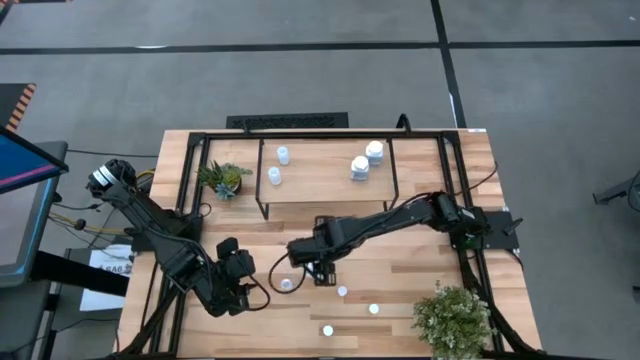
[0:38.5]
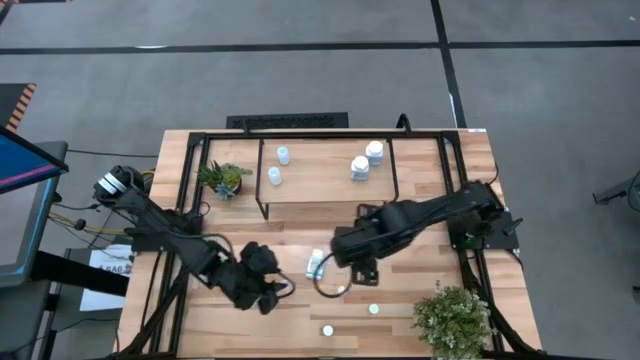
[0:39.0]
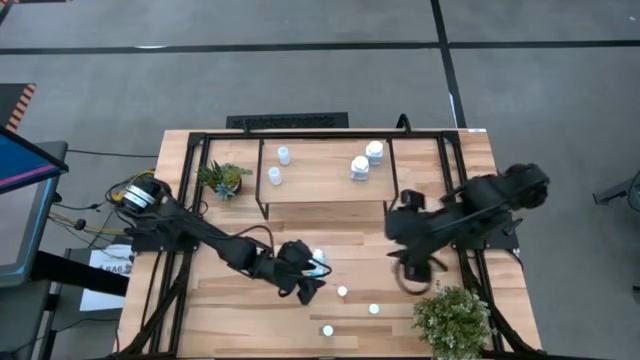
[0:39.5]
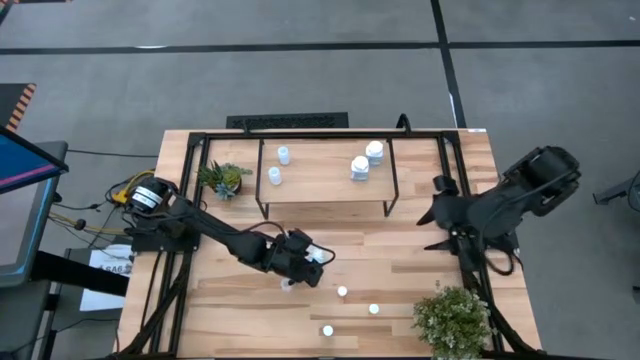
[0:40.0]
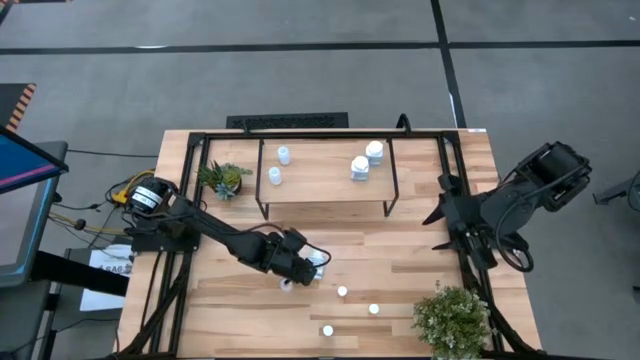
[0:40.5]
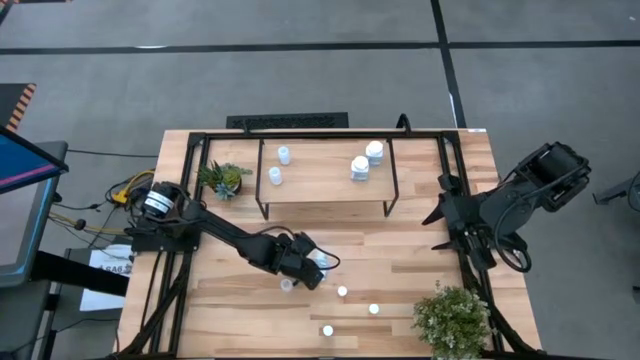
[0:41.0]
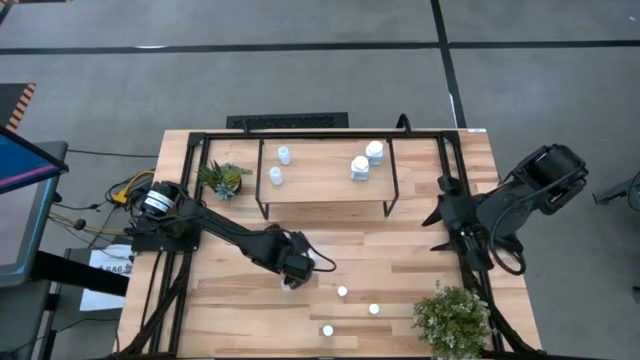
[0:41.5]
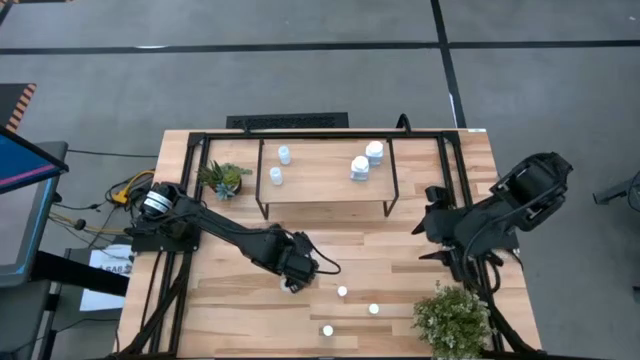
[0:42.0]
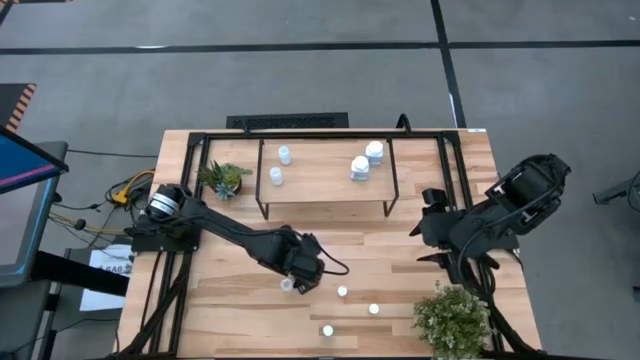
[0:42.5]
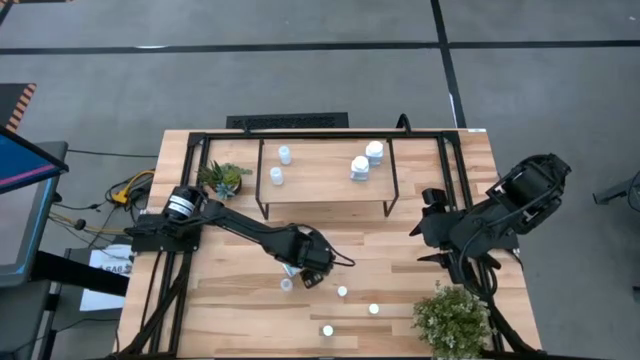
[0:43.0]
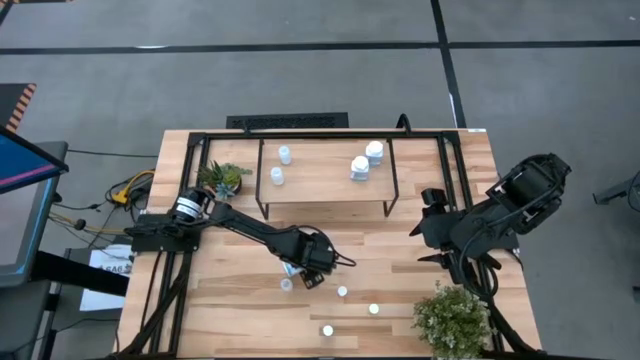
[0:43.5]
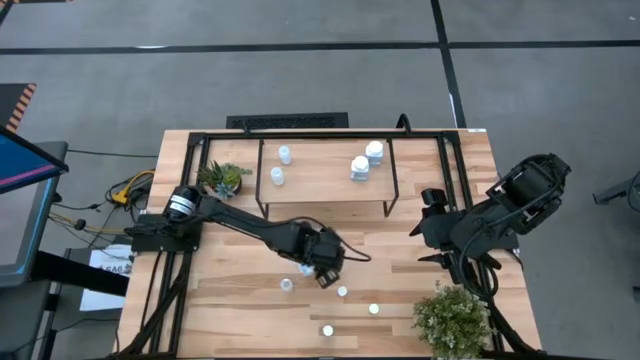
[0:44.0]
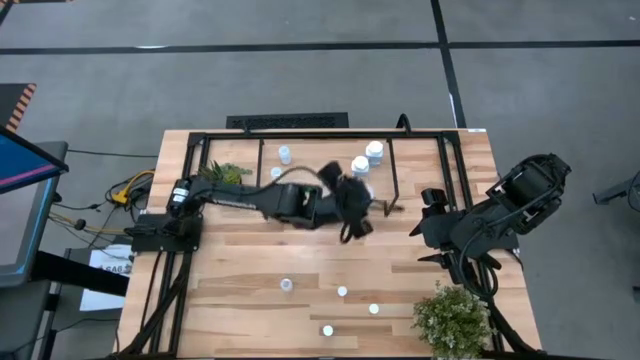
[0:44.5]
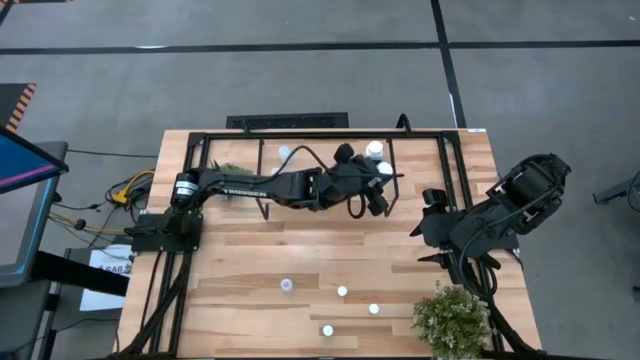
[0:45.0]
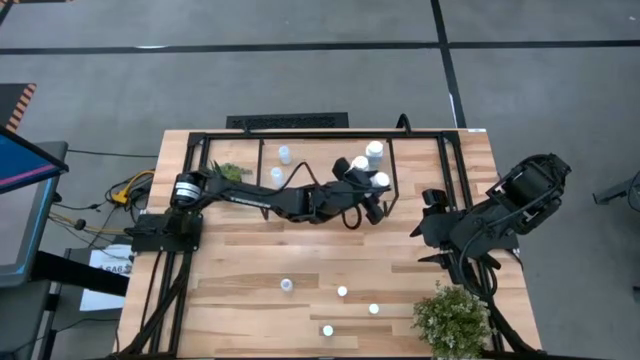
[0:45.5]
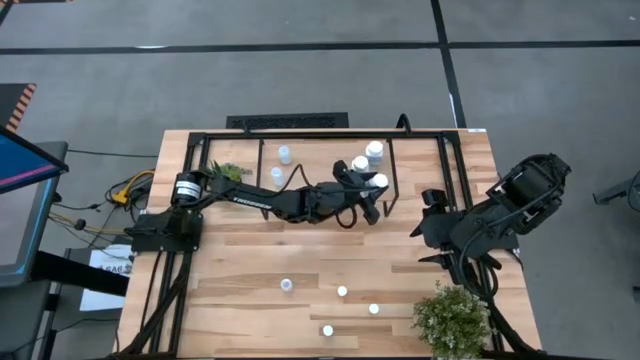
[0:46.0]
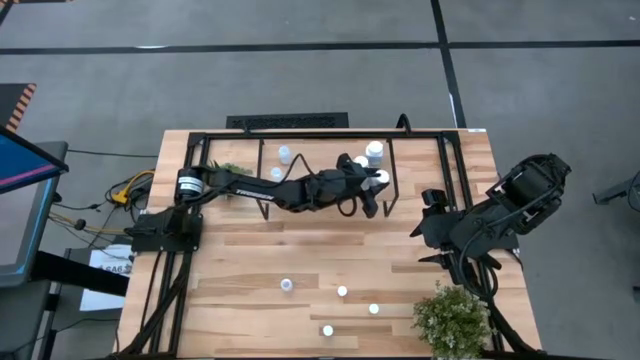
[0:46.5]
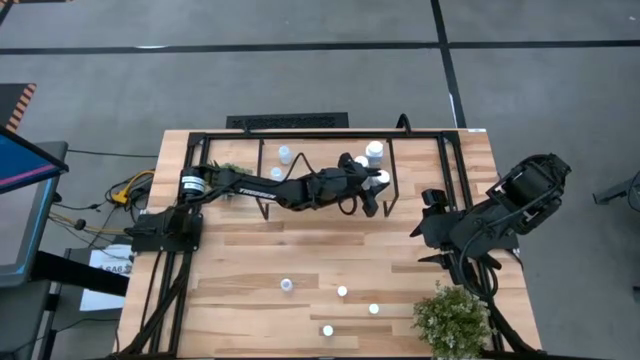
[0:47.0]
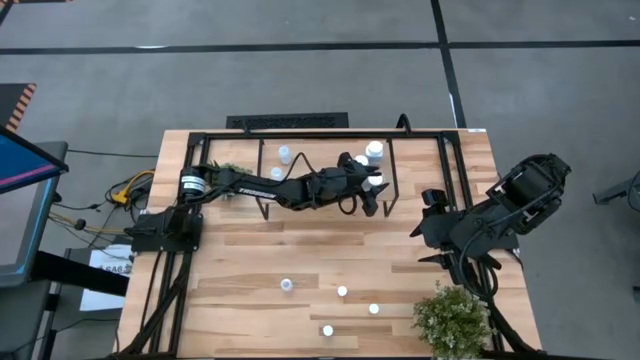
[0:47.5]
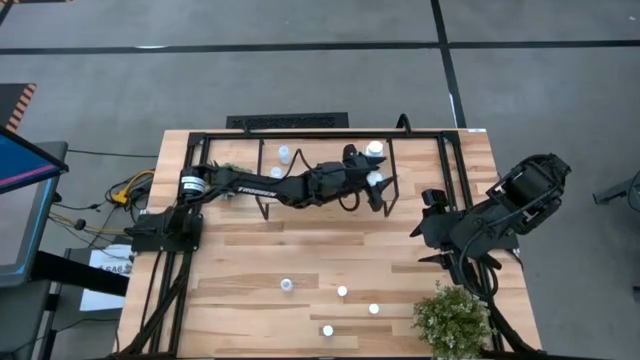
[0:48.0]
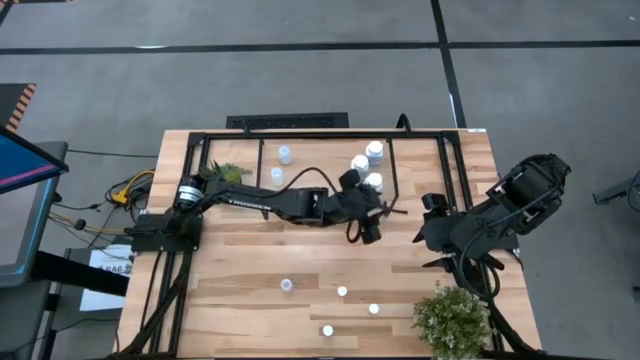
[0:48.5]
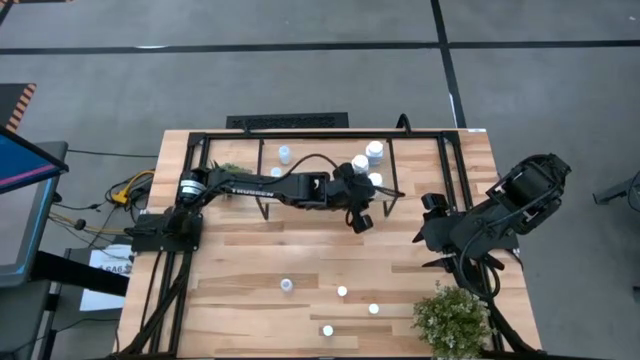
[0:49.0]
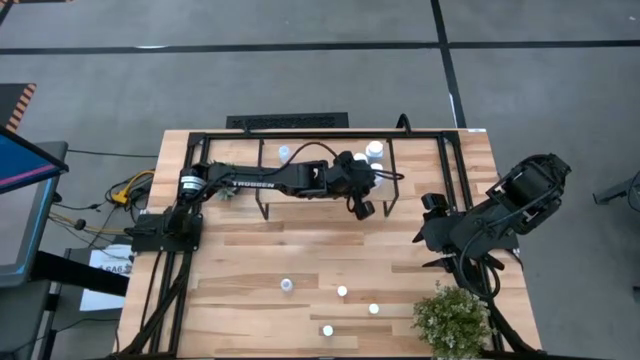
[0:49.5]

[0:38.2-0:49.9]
Task: Pick and place medicine bottles onto shelf by color
Put the white and blue pill bottle on the shelf

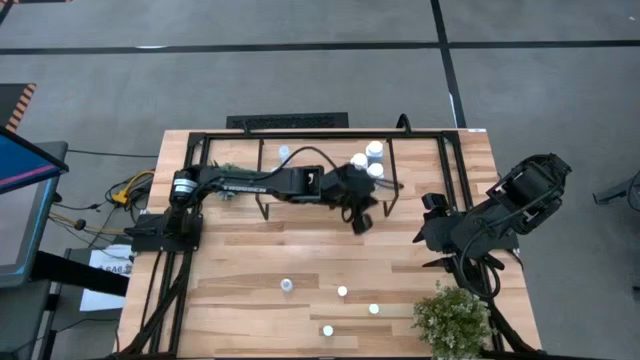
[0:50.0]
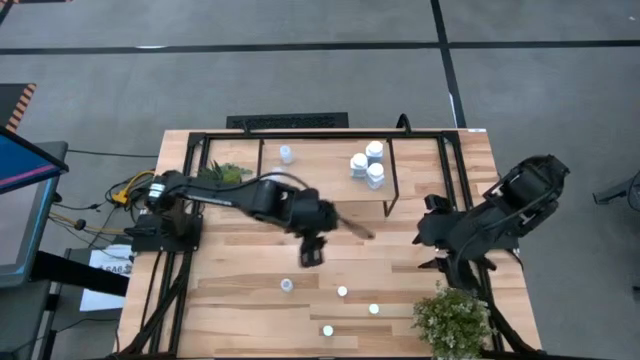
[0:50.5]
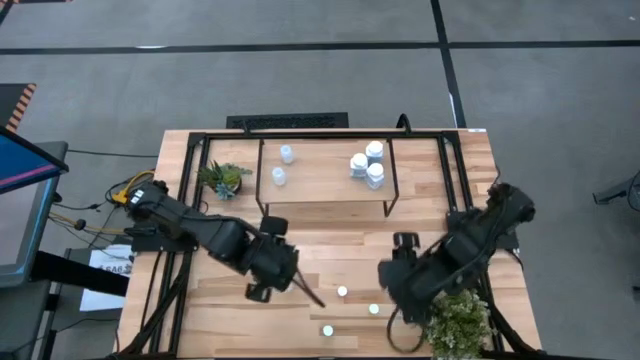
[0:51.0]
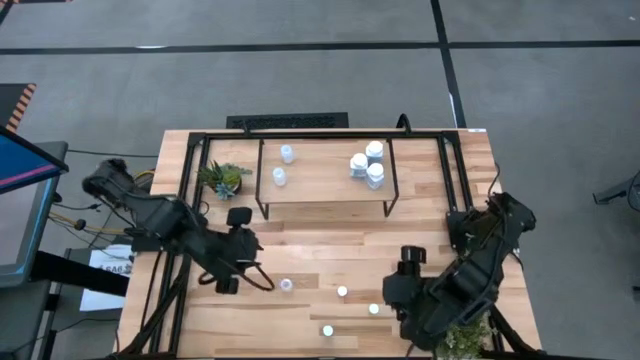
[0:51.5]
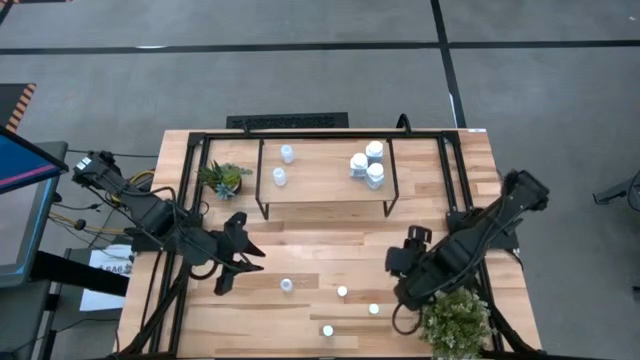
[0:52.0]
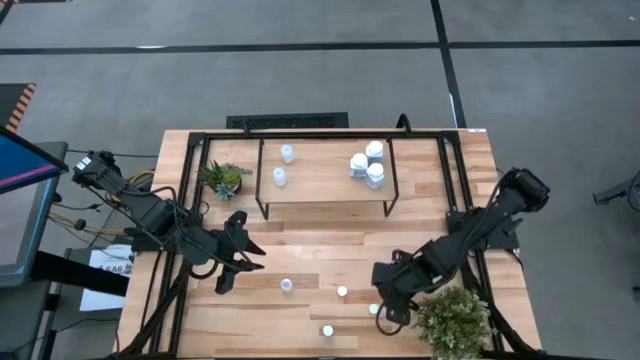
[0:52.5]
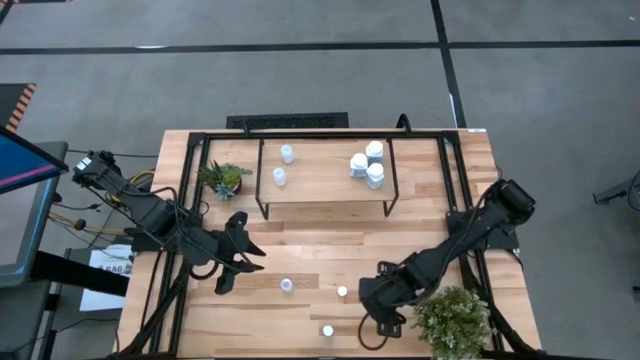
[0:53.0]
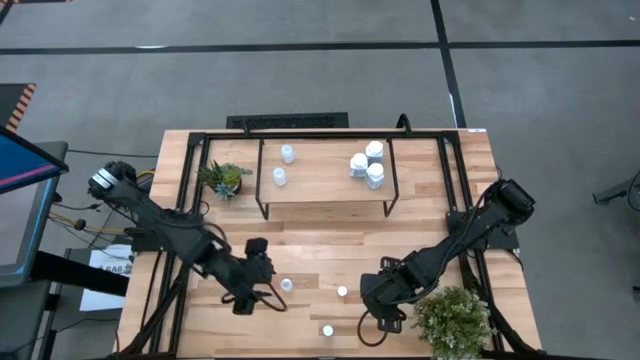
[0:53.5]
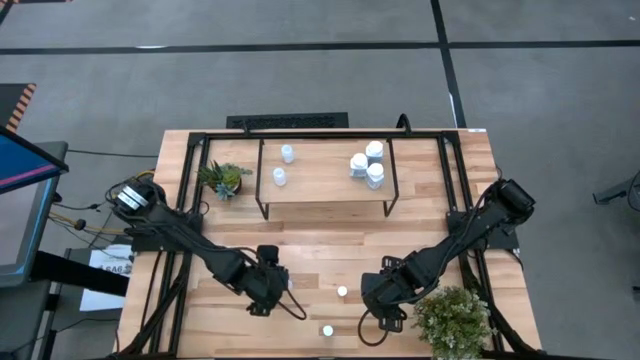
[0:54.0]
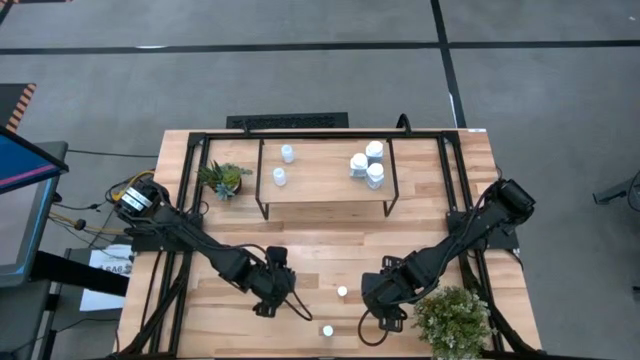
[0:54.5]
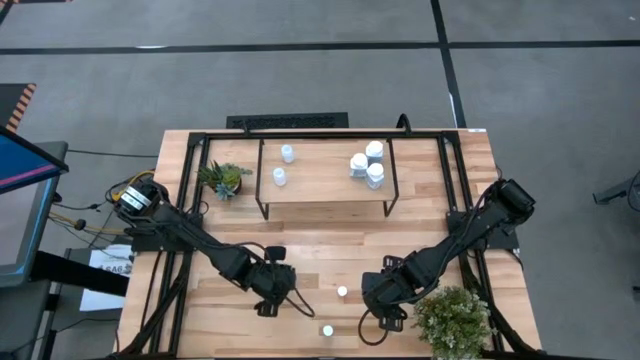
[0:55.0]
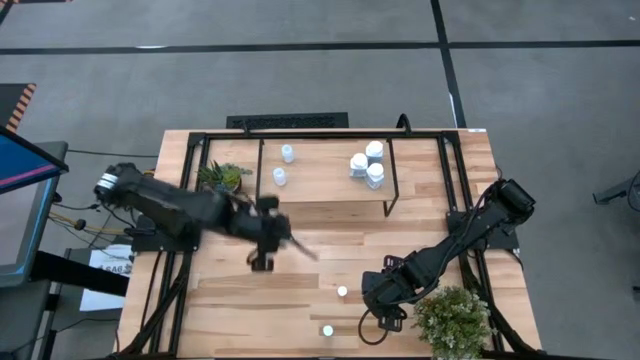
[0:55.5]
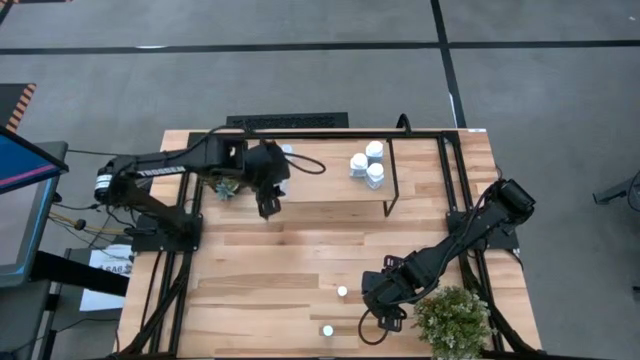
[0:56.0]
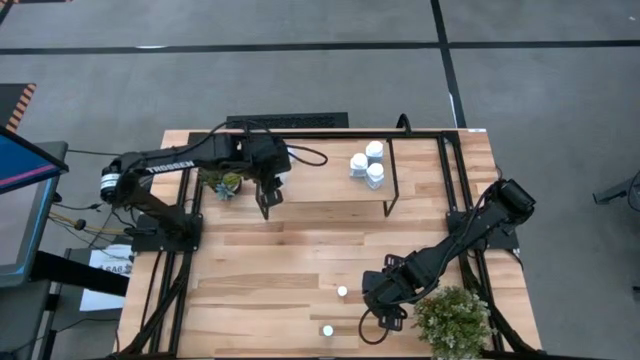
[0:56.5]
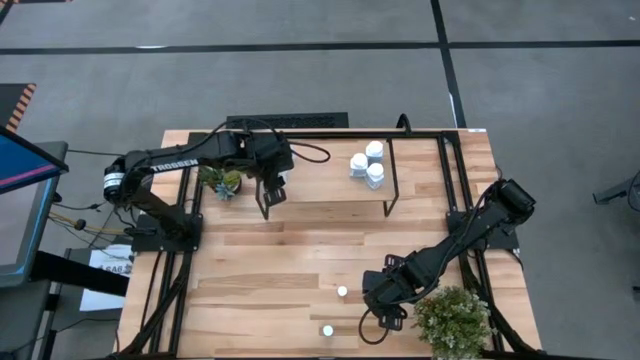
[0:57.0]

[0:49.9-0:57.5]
Put the transparent pill bottle on the shelf aligned with the other transparent pill bottles

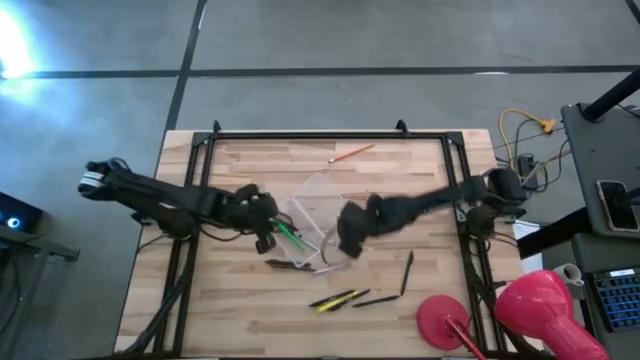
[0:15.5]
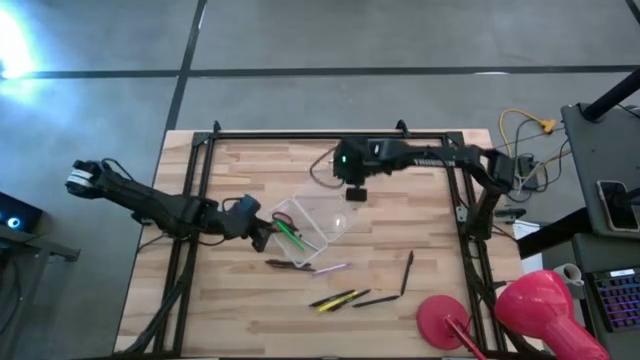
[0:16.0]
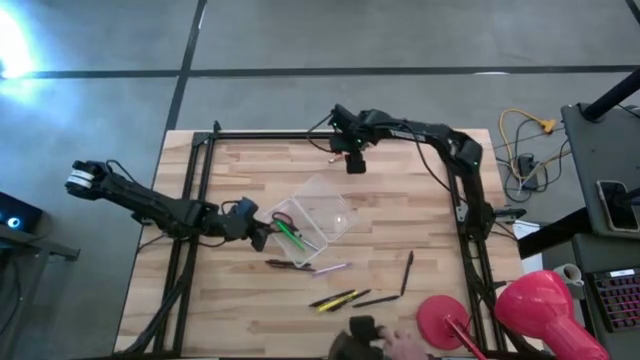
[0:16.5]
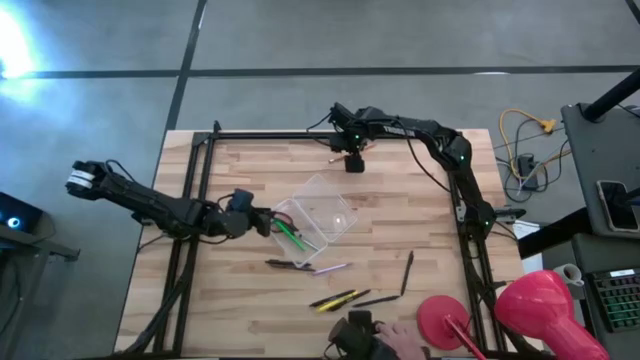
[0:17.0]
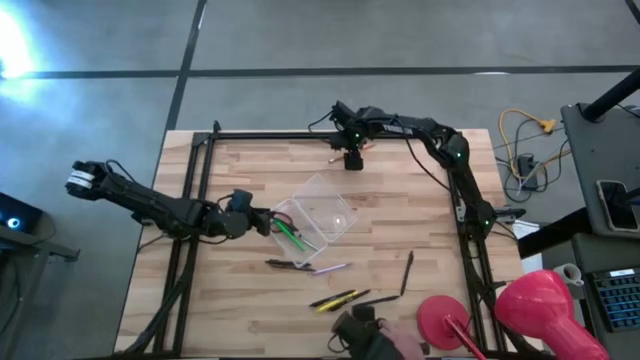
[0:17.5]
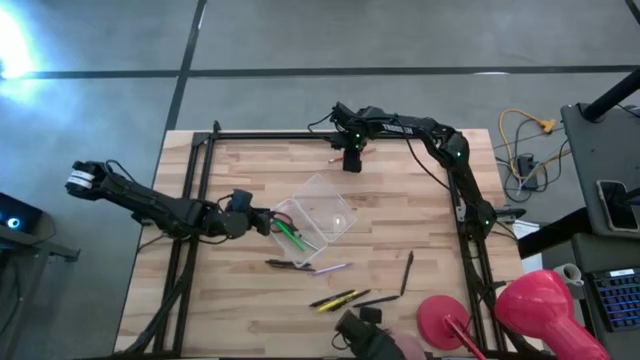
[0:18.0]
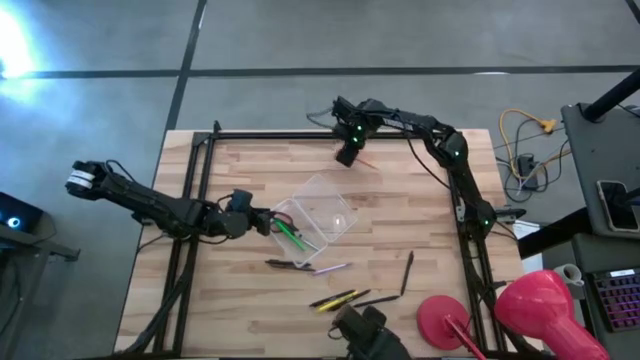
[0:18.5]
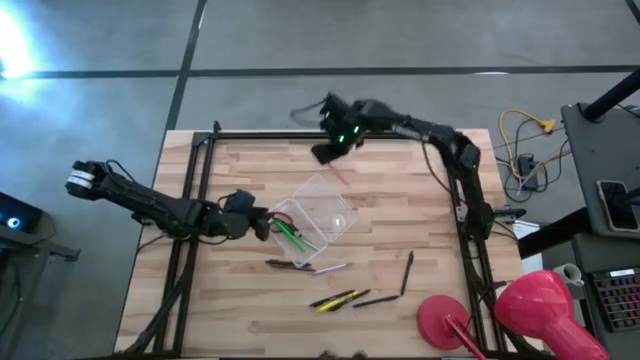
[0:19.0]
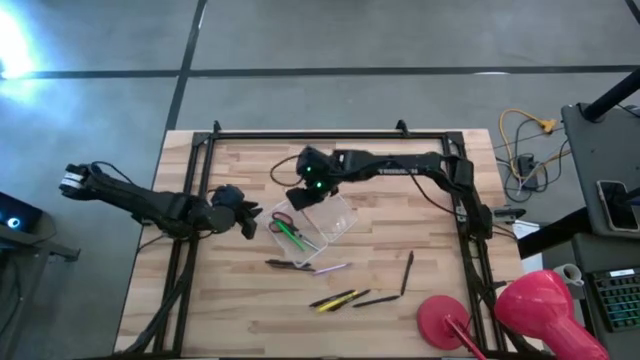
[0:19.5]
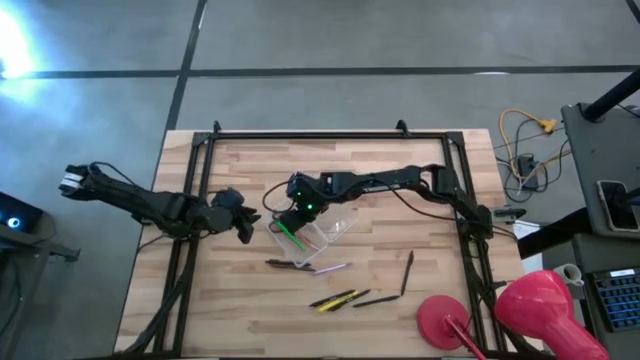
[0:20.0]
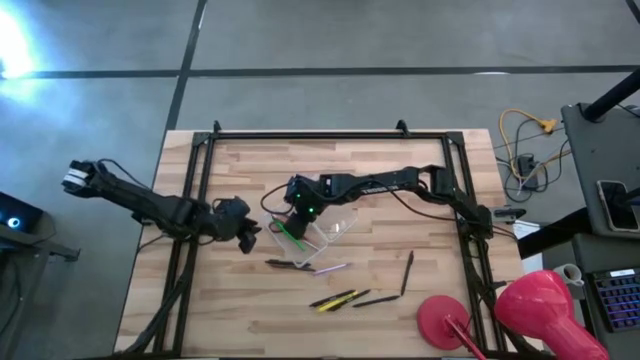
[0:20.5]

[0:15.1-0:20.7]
Task: Pick & place school supplies into a supply box
Put the pencil into the transparent case
